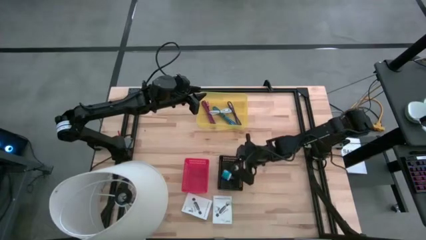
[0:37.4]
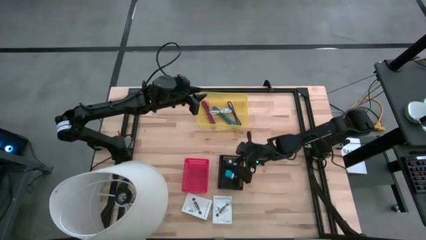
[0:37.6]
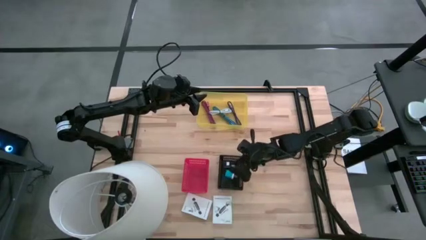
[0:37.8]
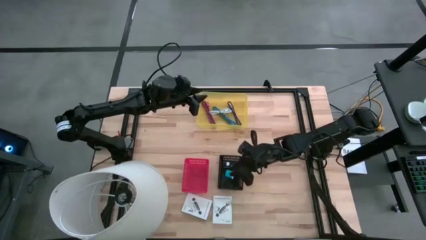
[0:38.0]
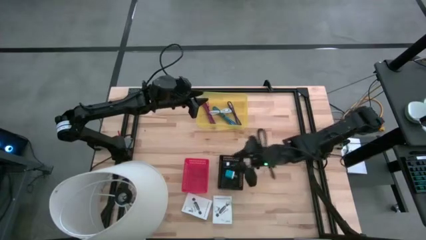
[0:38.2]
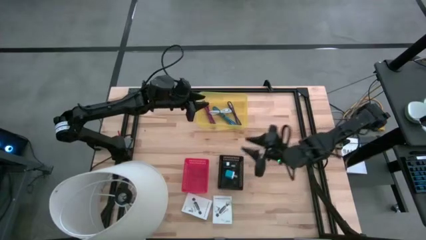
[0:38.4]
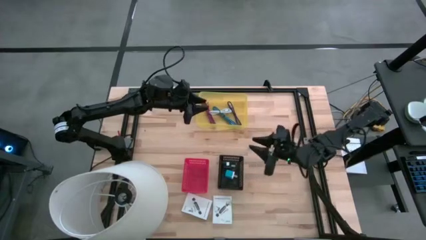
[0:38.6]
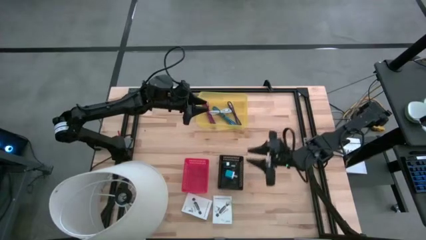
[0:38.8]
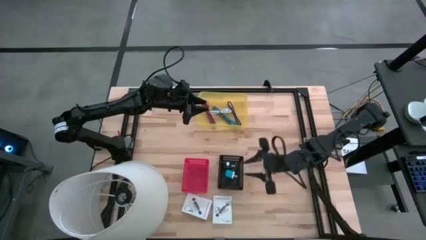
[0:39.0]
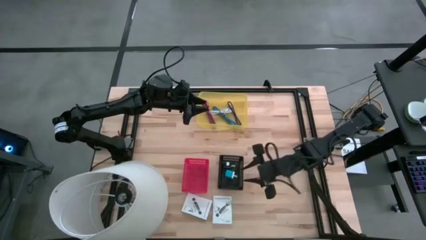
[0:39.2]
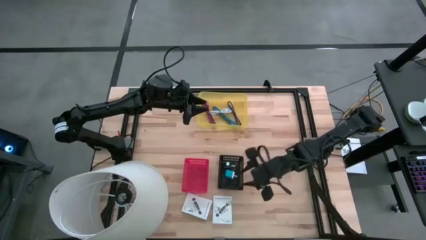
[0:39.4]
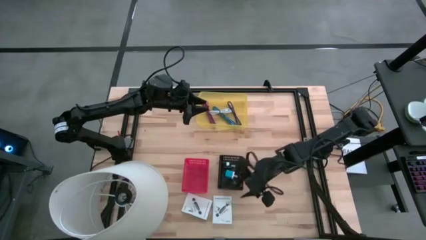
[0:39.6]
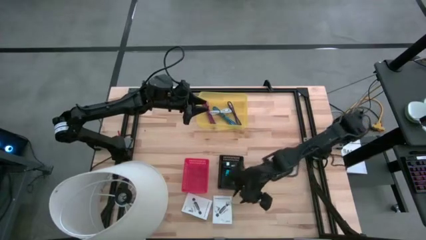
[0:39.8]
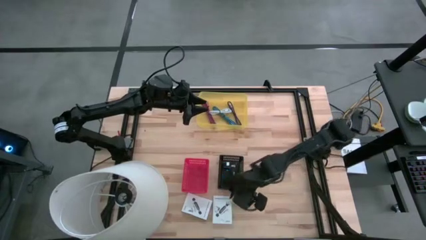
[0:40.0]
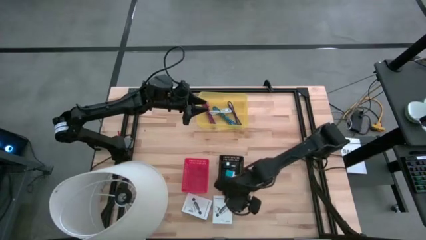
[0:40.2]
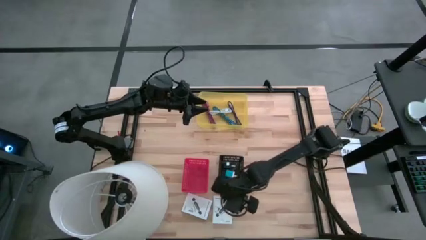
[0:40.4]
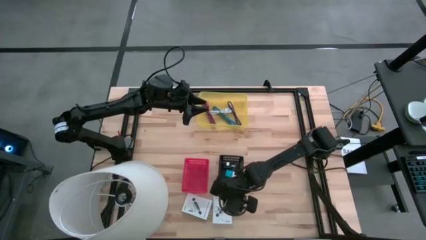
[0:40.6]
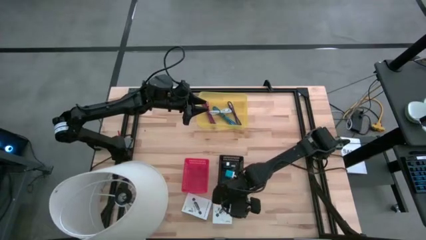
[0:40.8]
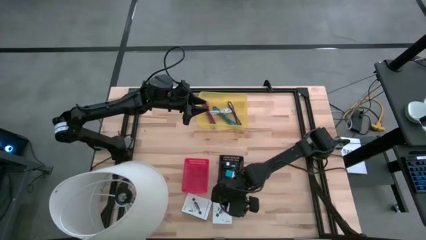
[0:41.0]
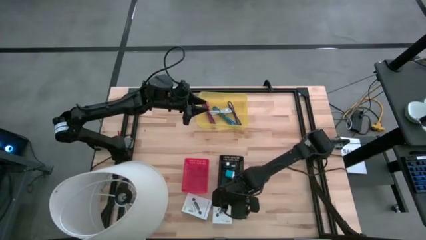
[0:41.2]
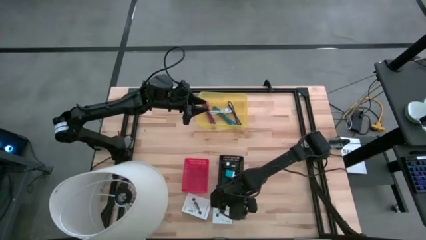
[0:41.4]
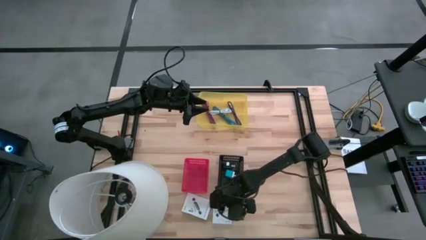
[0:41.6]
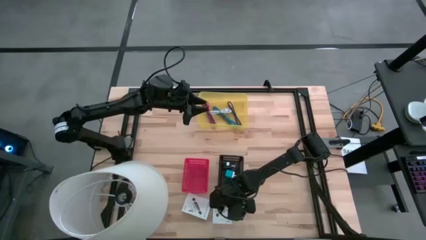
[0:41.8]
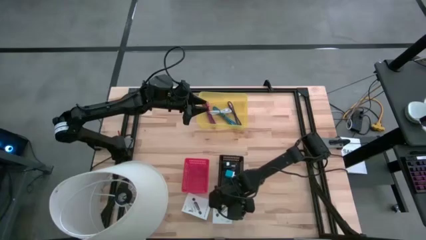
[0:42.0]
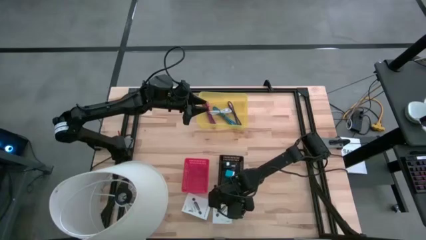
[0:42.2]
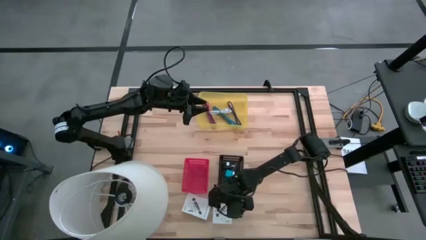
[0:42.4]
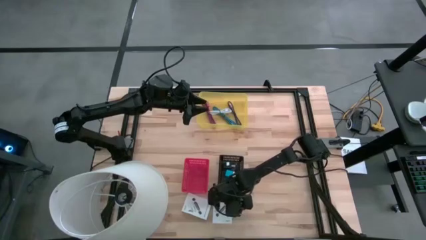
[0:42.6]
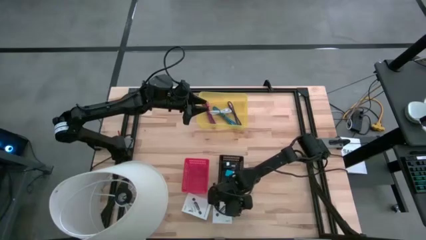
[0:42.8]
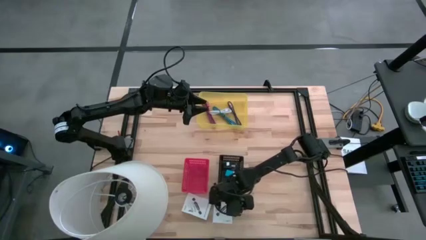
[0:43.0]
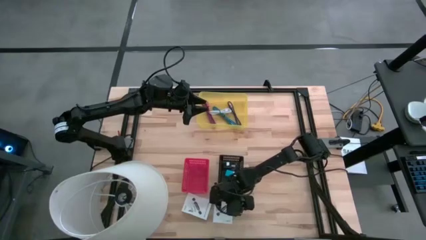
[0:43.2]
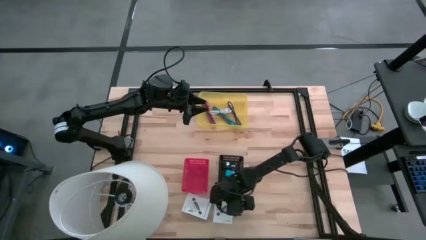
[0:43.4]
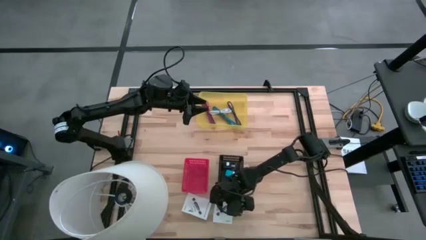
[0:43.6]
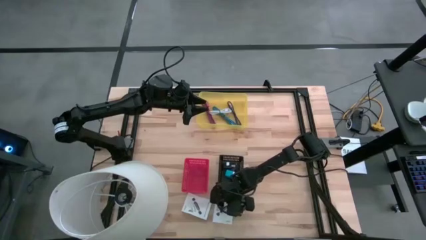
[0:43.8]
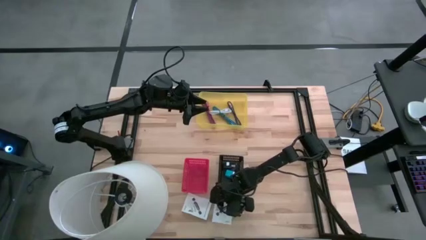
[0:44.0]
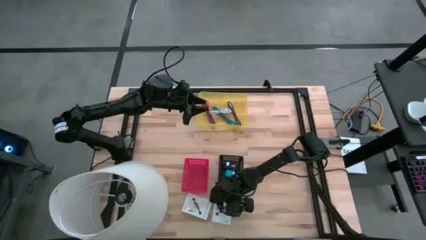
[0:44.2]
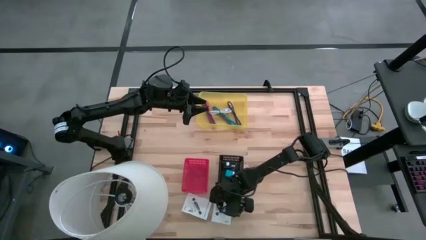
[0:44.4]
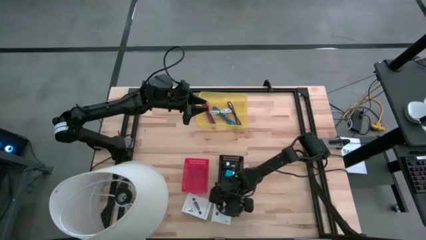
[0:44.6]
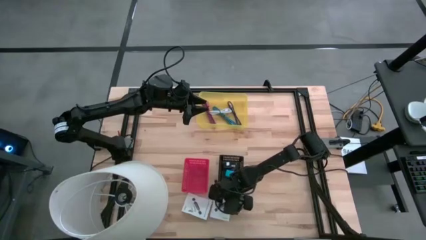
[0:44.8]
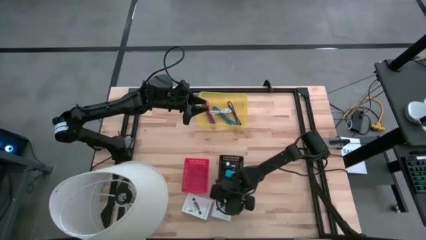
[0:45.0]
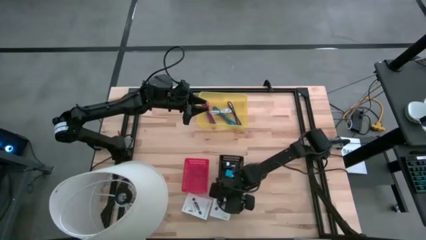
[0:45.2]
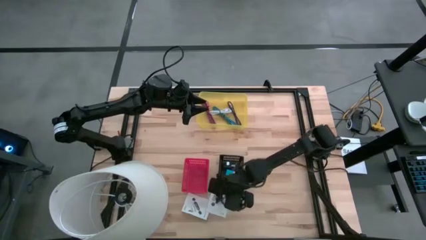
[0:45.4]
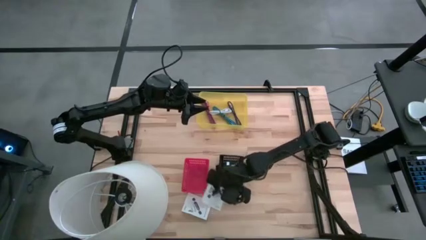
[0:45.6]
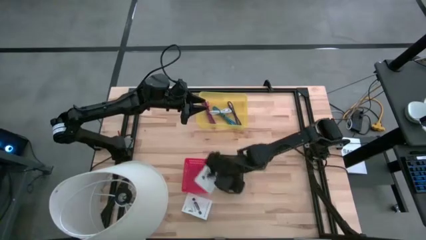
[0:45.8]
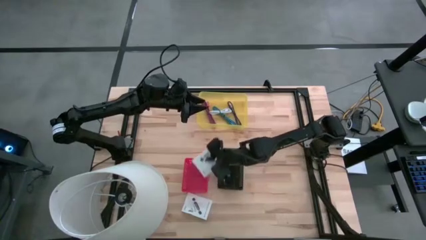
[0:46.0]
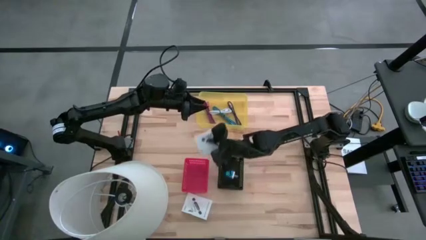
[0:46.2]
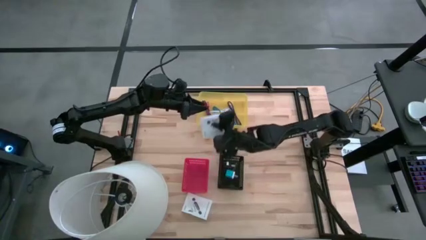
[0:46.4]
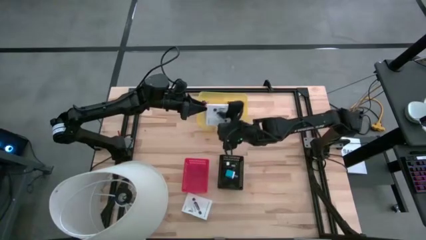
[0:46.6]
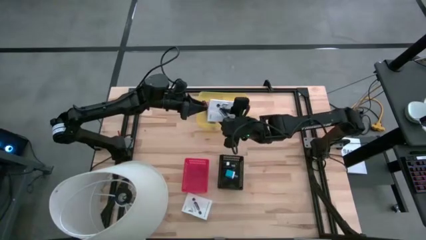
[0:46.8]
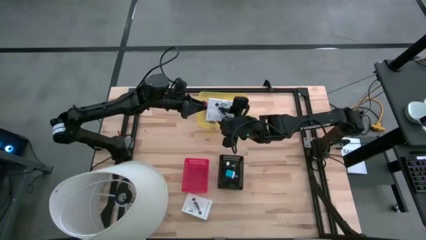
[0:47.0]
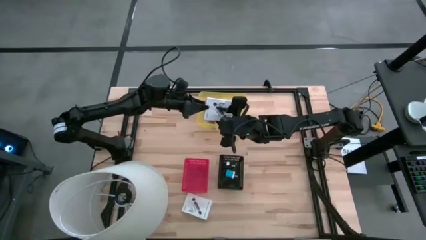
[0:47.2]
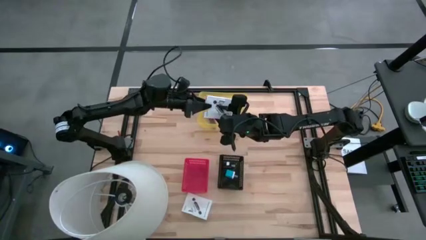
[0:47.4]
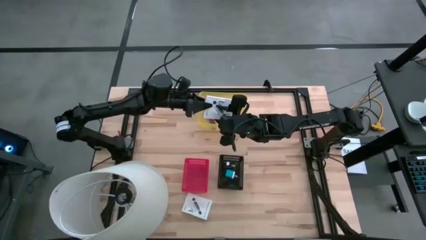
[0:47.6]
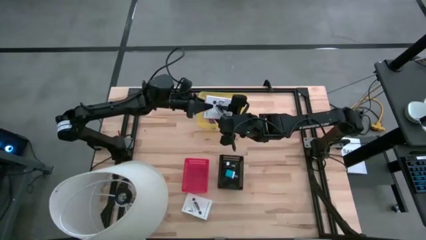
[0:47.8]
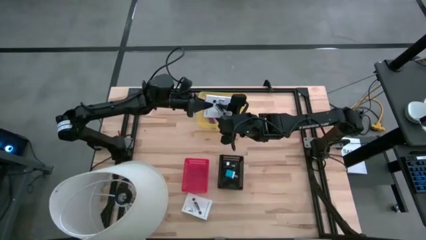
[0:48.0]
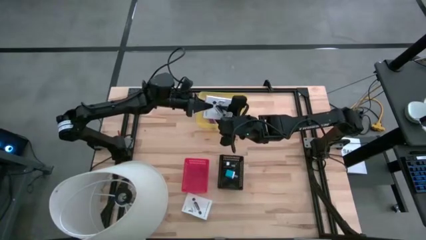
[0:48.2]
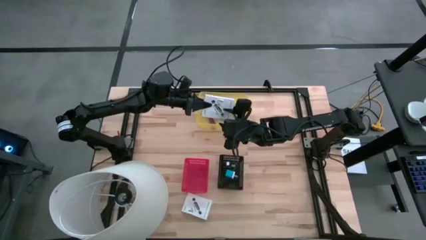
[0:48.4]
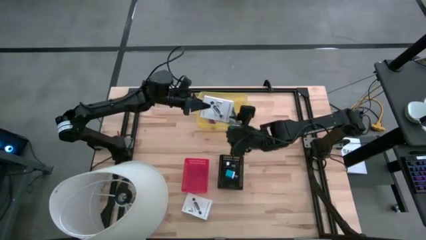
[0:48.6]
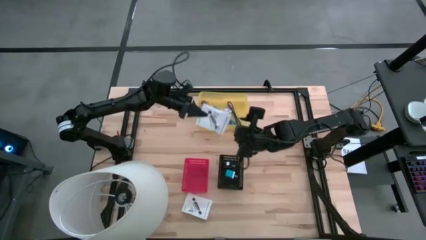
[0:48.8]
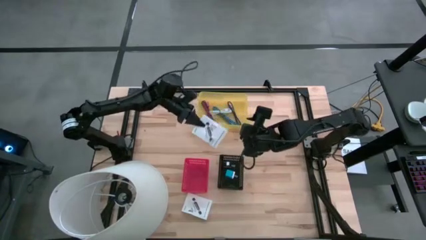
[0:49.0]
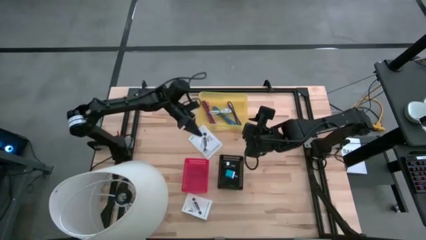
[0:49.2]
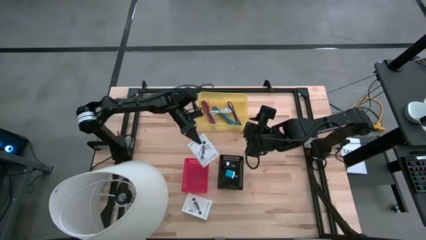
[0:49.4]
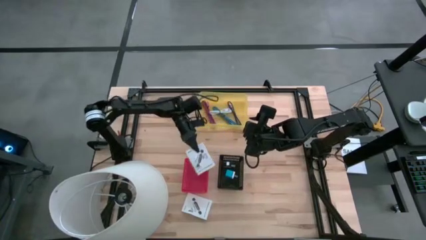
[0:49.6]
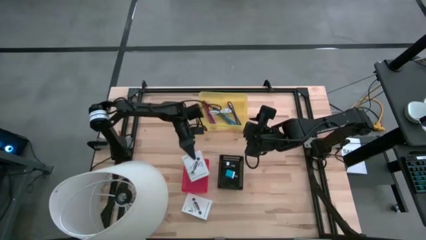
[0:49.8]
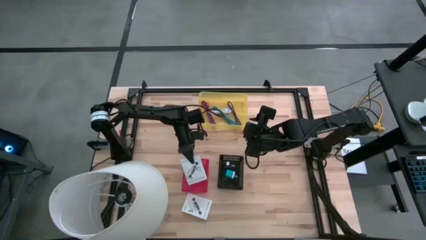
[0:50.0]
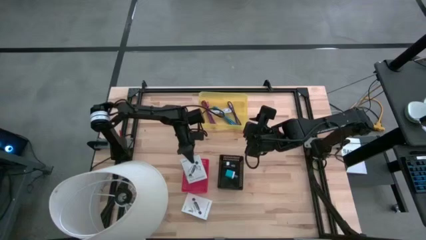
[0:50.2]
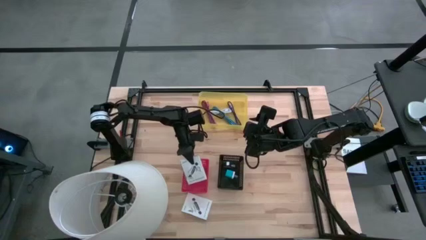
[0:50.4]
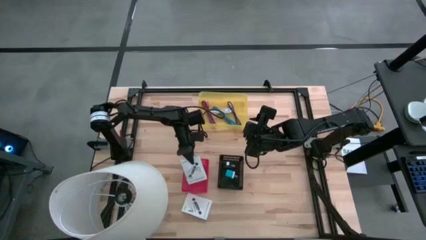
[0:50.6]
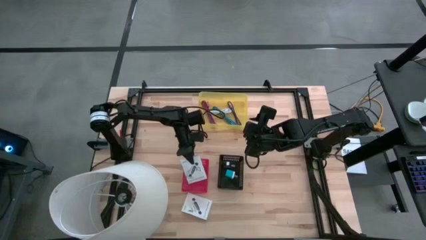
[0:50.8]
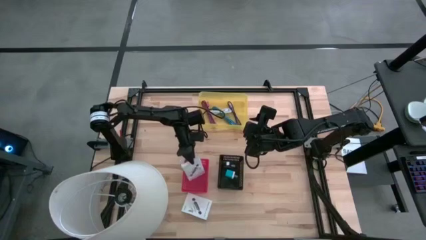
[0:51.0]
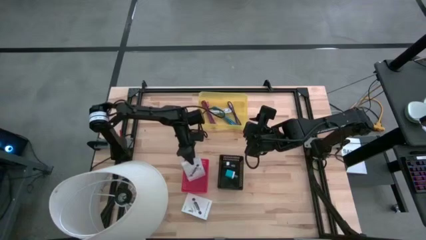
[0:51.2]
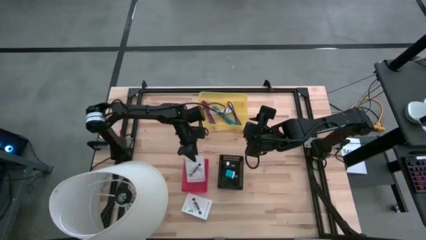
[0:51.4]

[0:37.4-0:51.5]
Task: Pick and place items into bin
Put the right card reader box into the red bin
